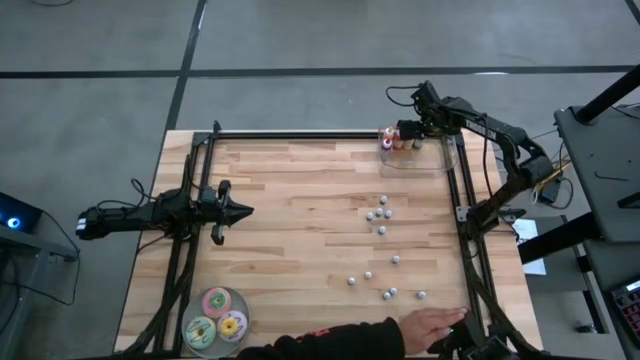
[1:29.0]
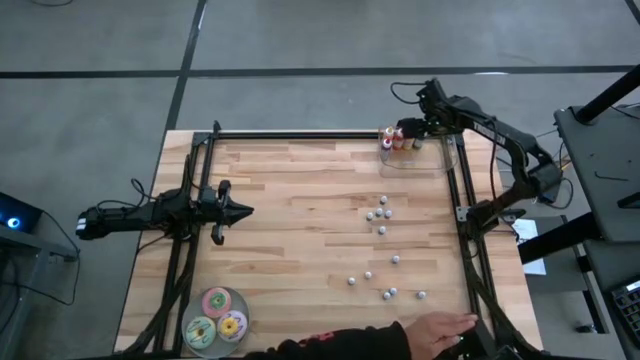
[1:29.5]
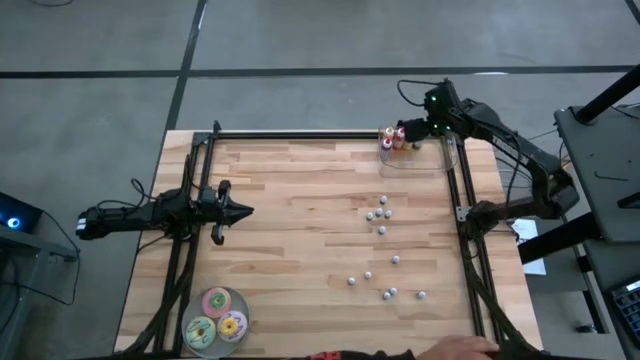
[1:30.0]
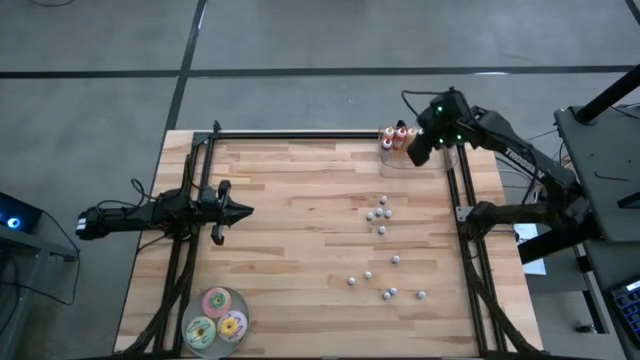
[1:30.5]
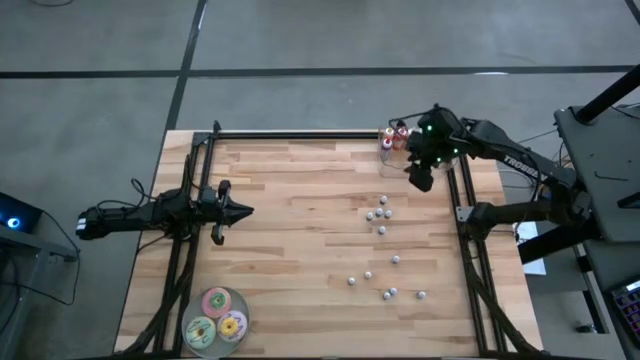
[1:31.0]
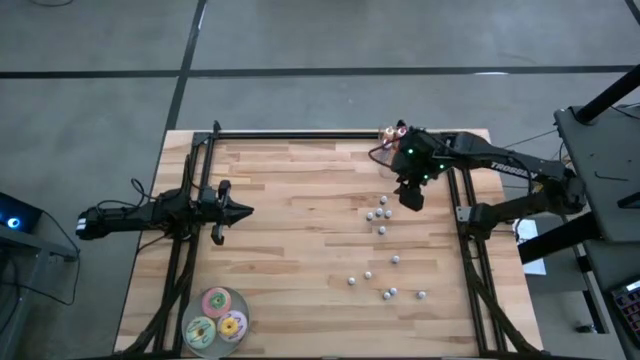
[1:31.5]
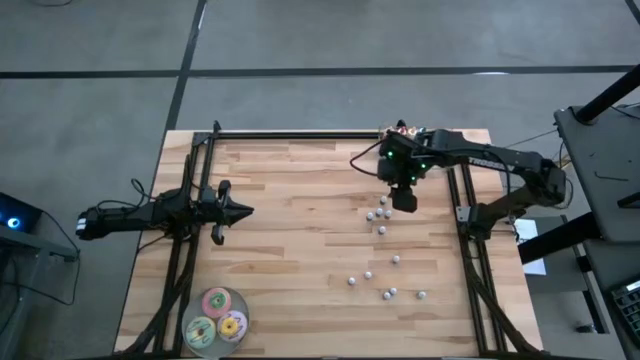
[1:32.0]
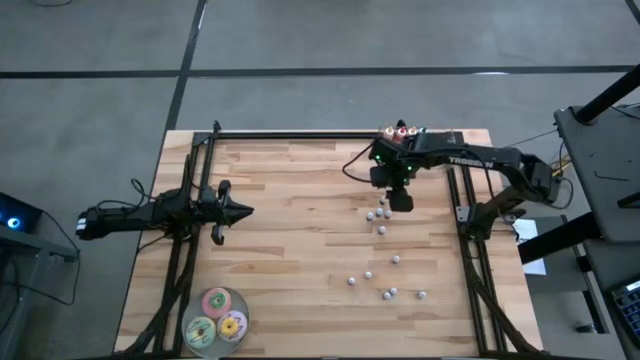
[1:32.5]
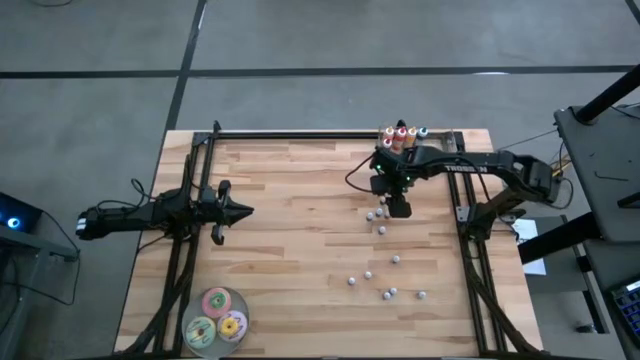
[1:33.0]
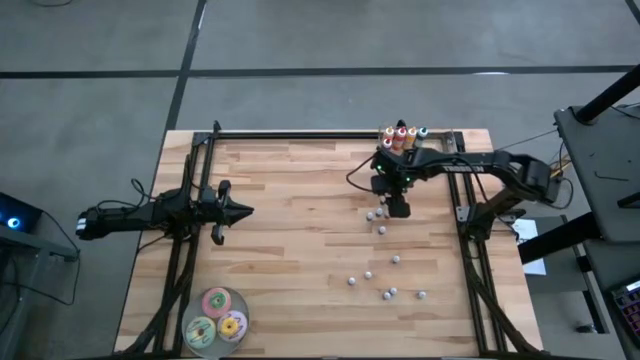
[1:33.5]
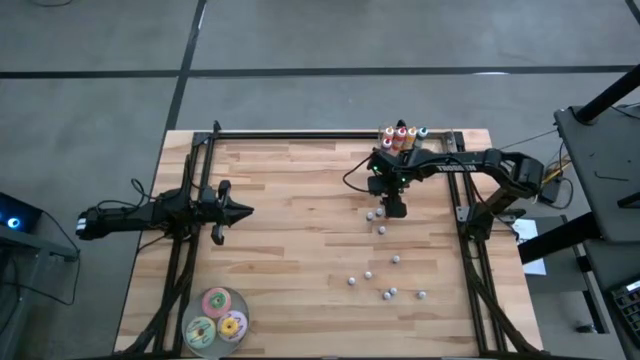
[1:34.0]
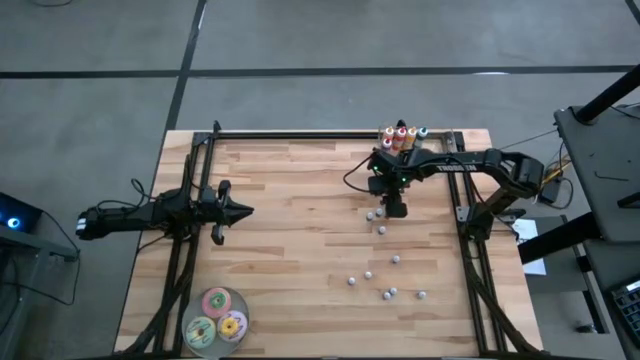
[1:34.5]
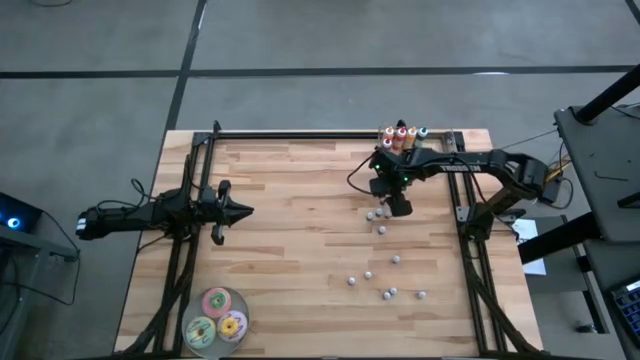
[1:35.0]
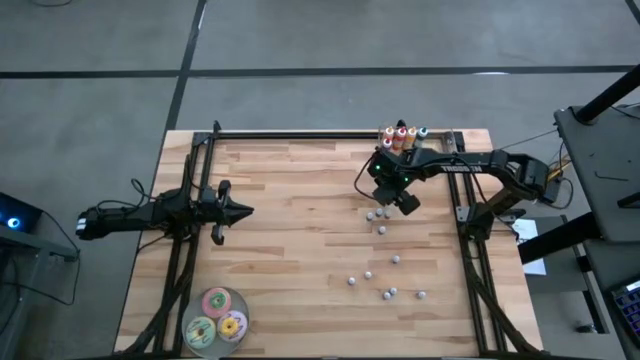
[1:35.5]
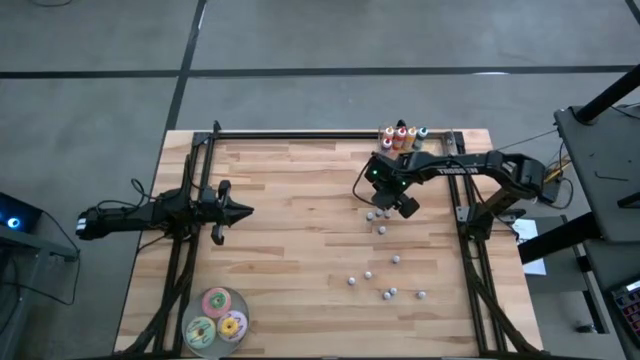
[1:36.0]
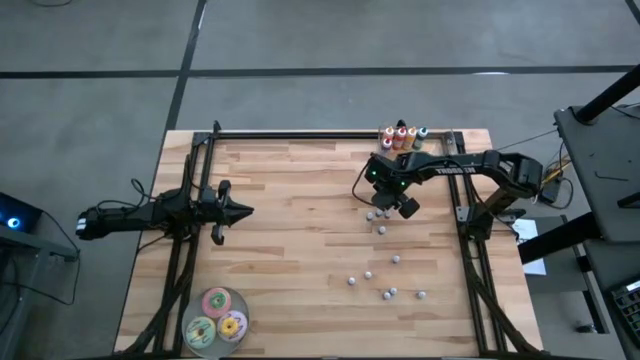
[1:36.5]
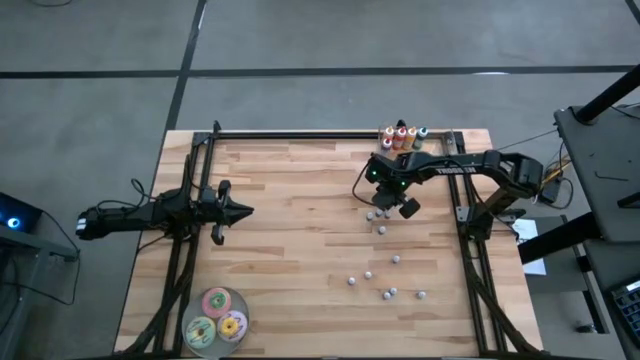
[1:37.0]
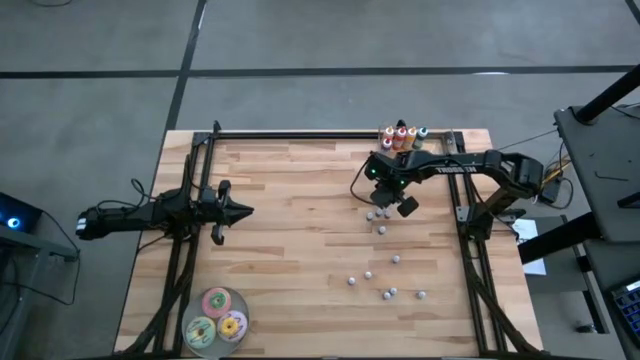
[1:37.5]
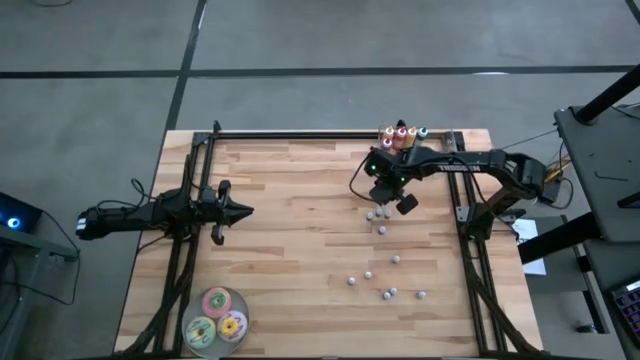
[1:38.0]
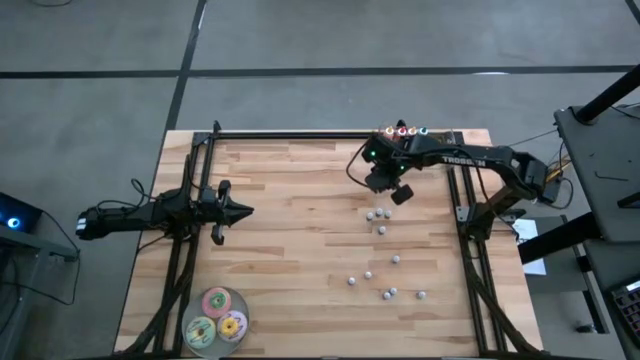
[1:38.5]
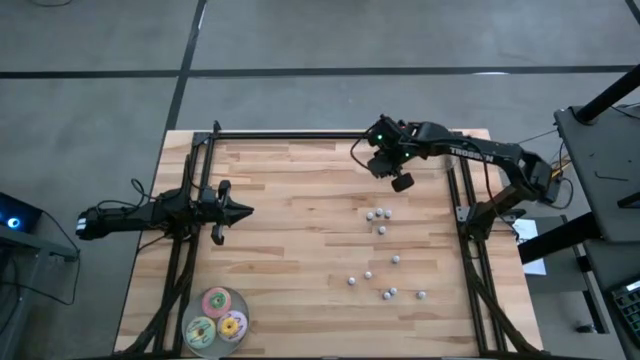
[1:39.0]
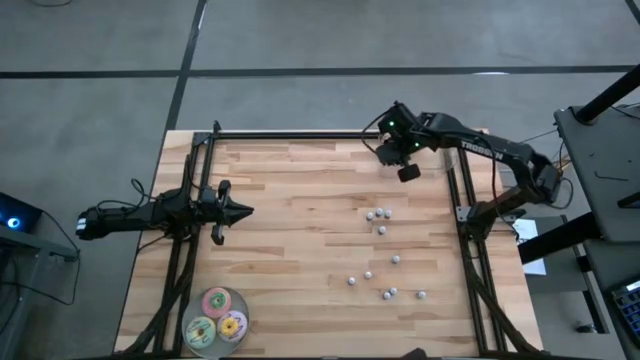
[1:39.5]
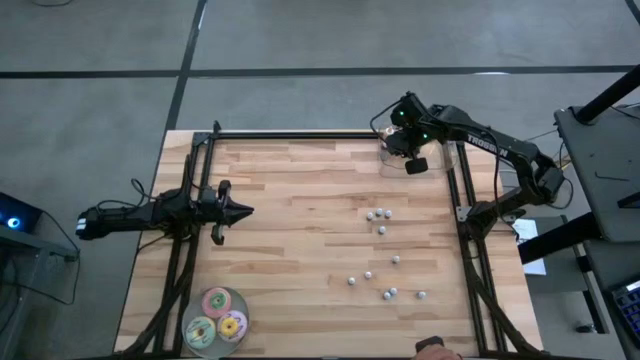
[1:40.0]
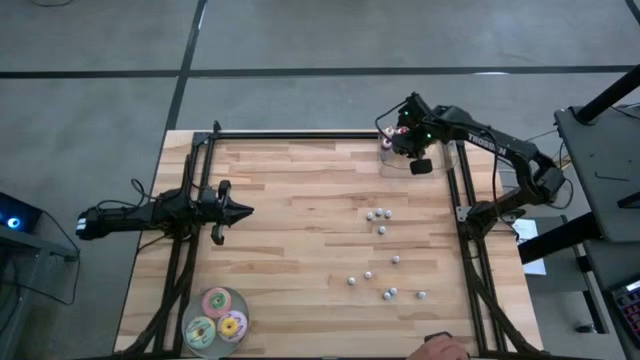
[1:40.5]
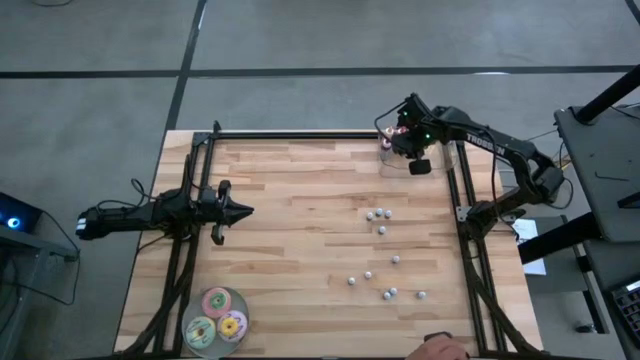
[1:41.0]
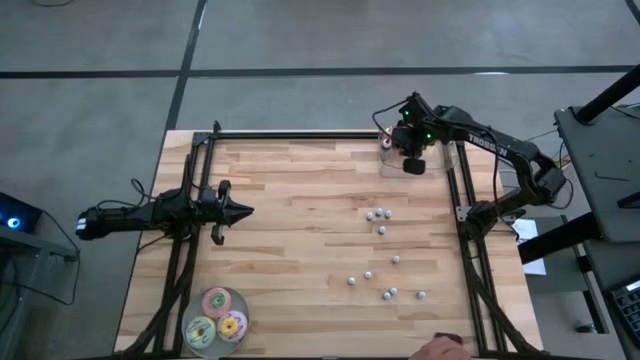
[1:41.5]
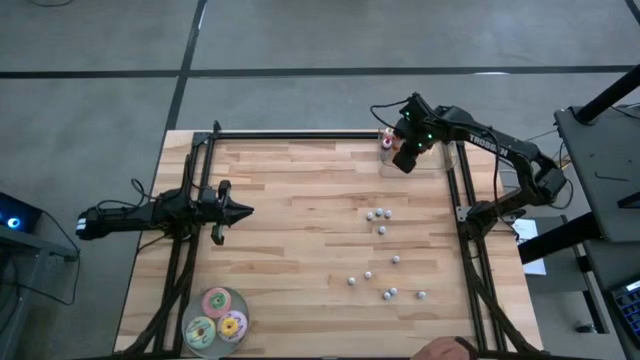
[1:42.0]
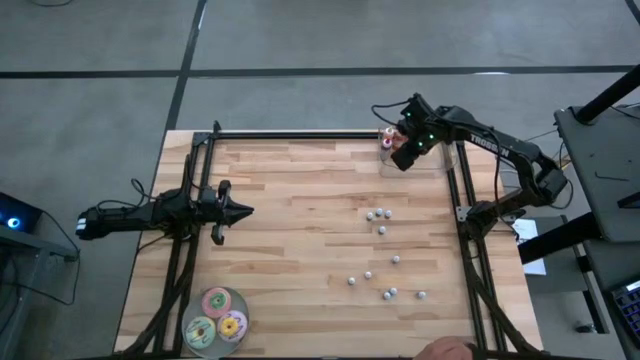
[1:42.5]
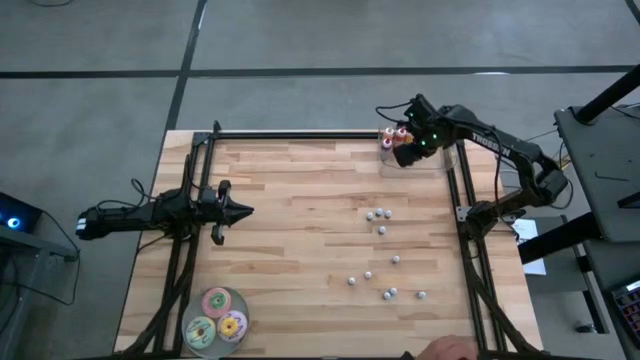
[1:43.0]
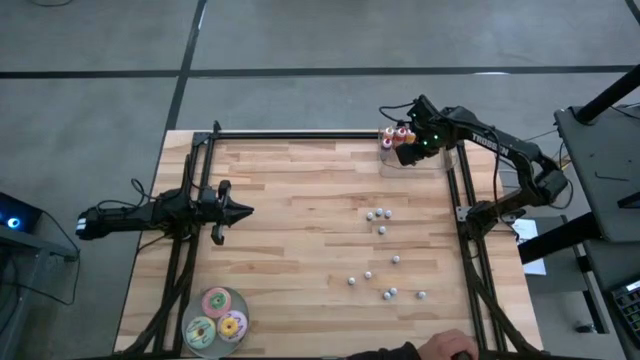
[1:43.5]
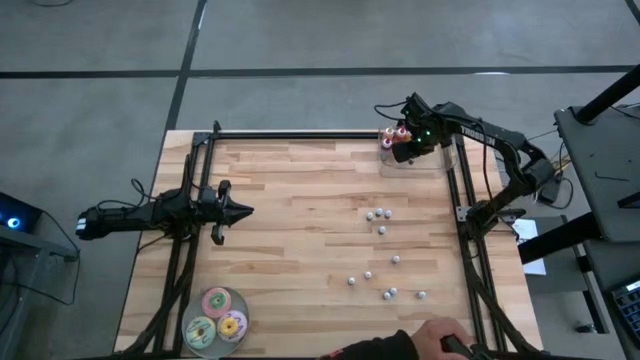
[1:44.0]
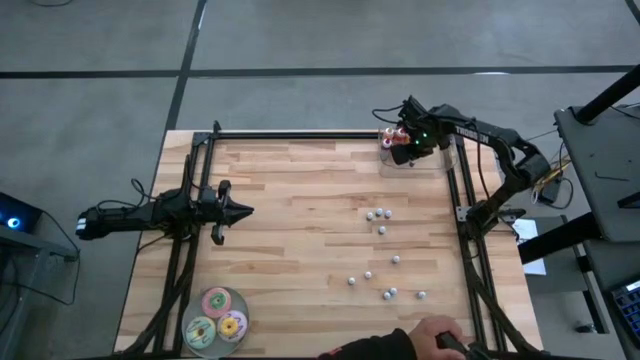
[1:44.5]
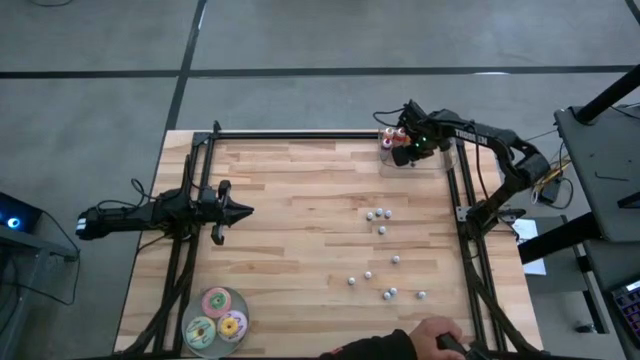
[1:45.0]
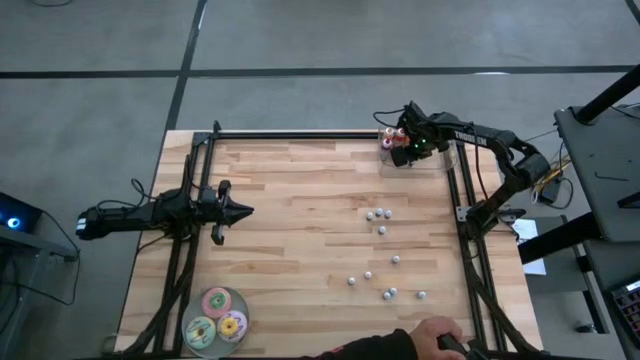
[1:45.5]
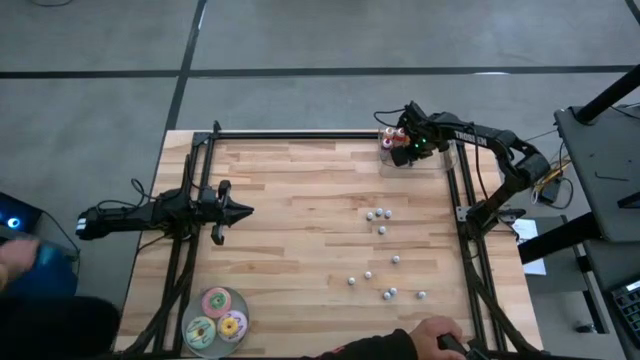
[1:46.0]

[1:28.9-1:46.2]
Task: Pick & Place food coloring
Put the small blue food coloring bottle into the bin

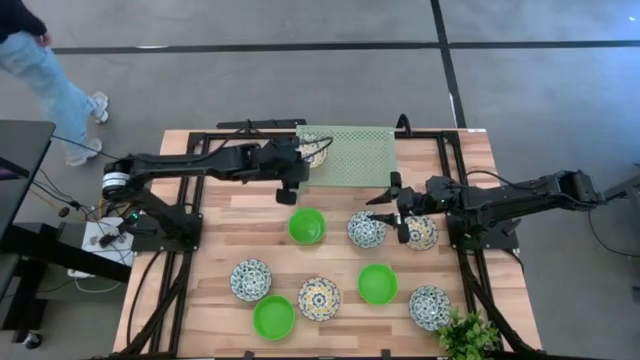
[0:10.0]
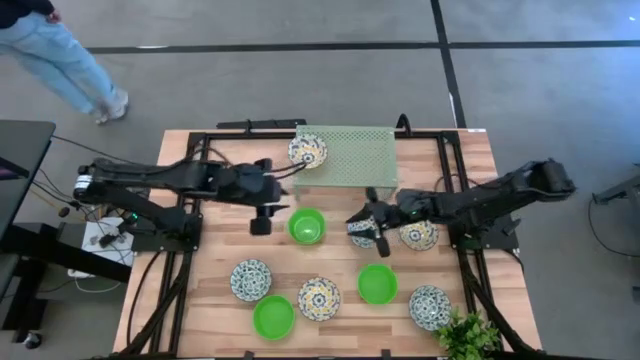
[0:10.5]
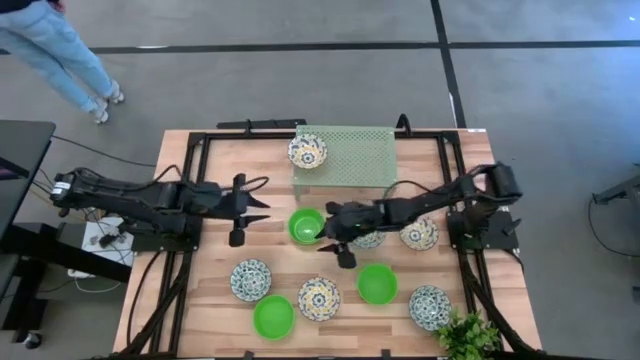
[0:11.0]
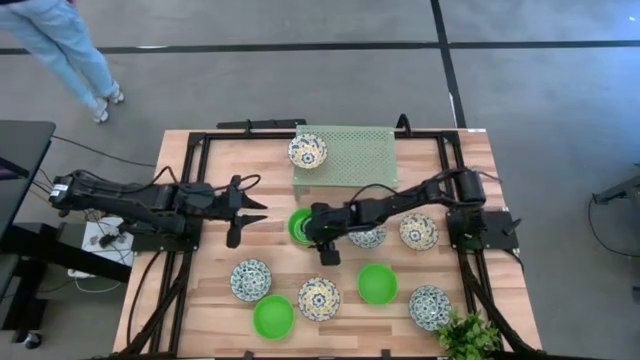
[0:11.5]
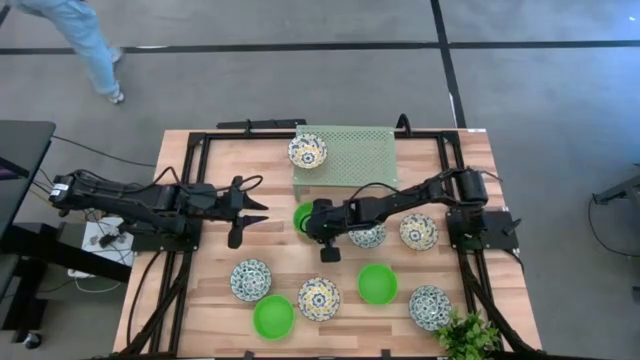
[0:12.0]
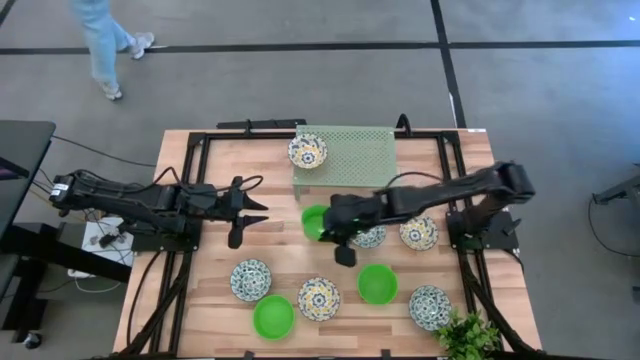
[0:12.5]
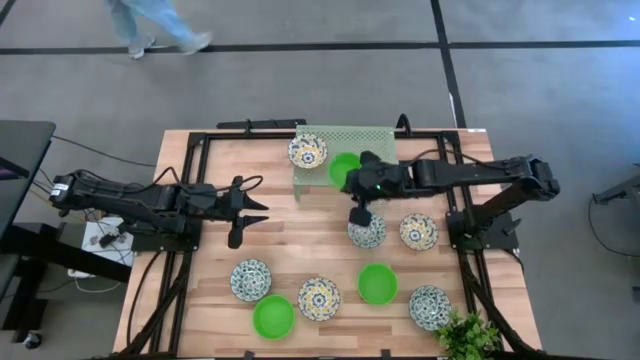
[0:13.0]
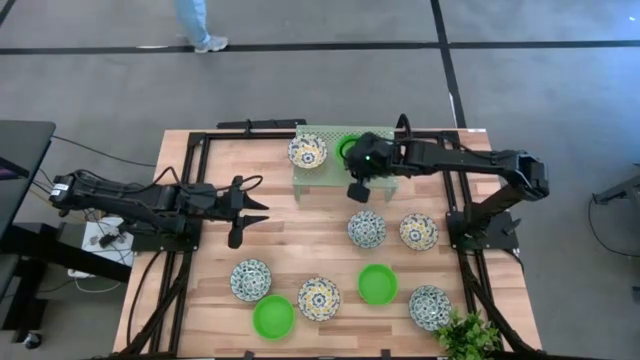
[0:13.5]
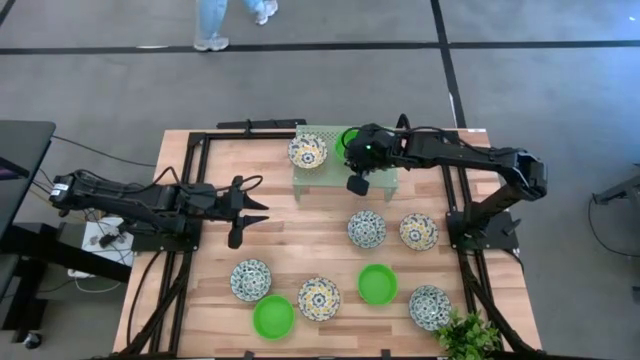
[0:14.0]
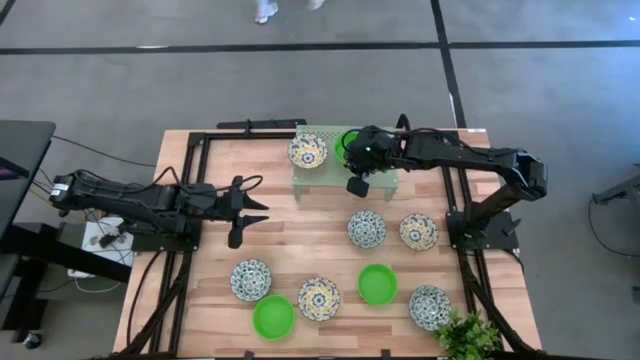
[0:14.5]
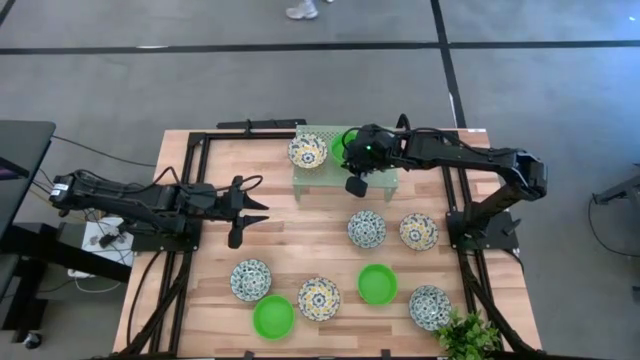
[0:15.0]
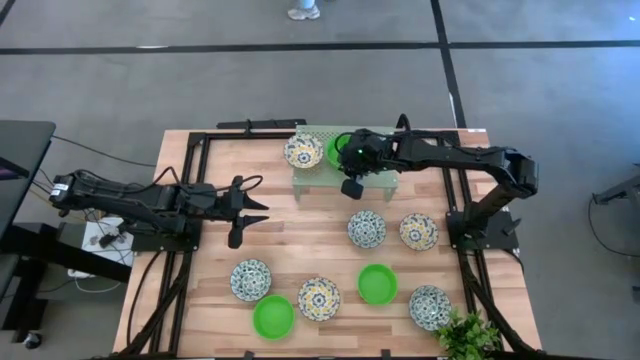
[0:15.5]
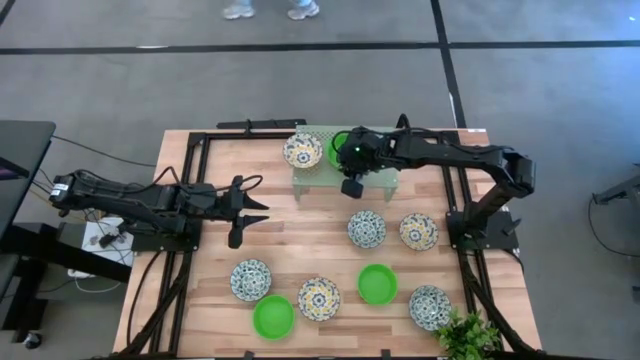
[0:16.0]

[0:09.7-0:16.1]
Task: Pick & Place Mini bowls
Put the top green bowl on the shelf
